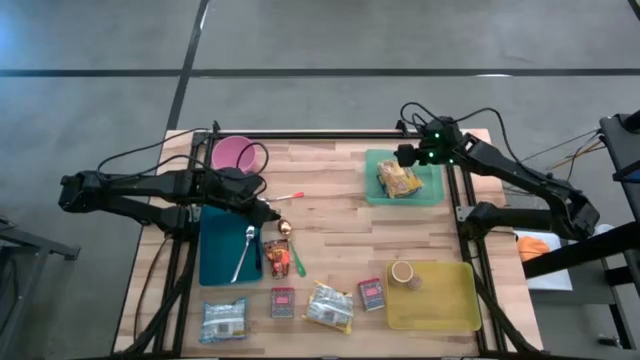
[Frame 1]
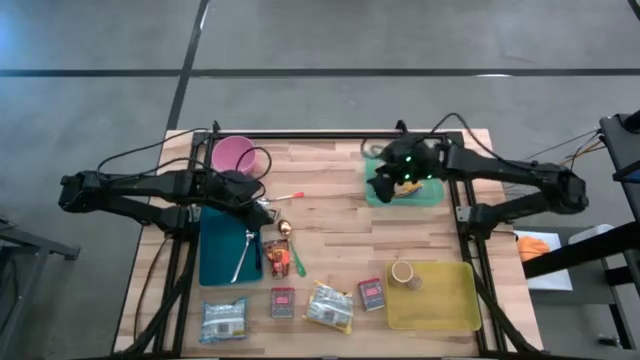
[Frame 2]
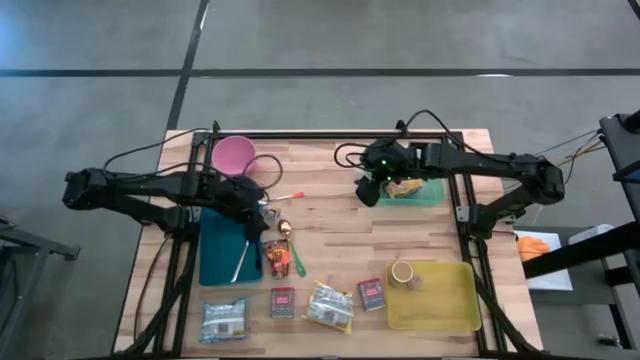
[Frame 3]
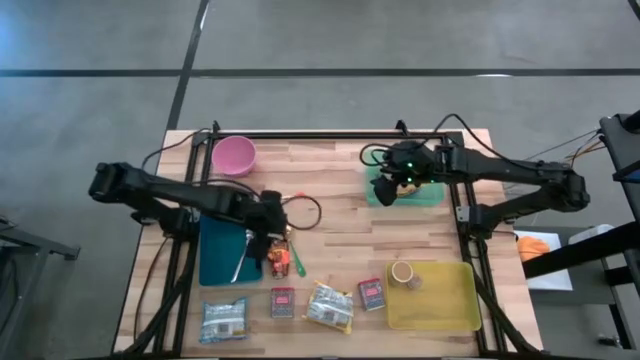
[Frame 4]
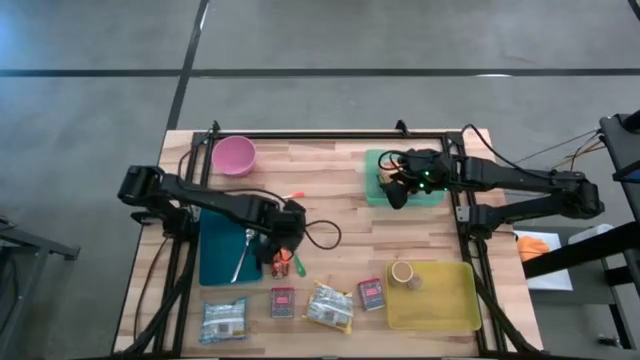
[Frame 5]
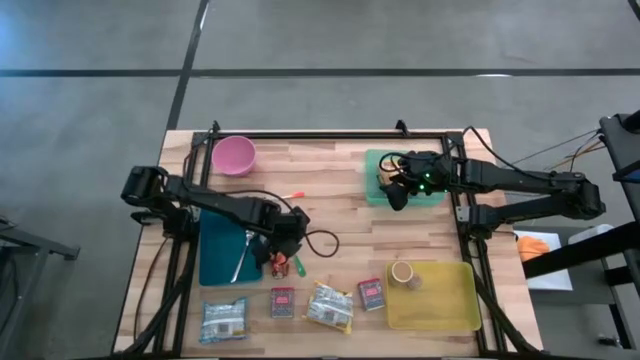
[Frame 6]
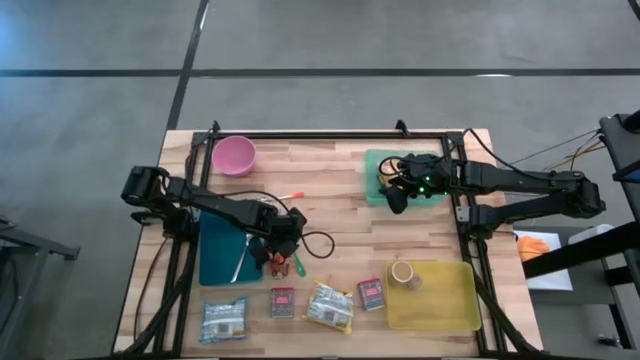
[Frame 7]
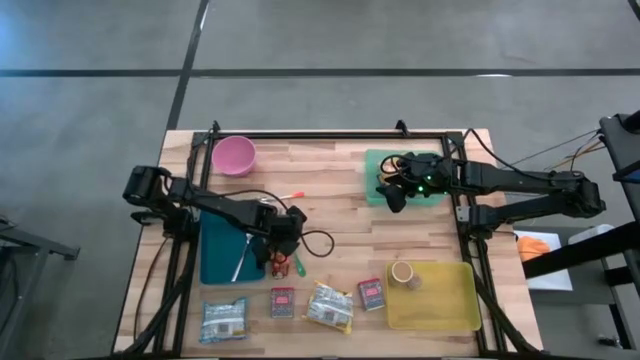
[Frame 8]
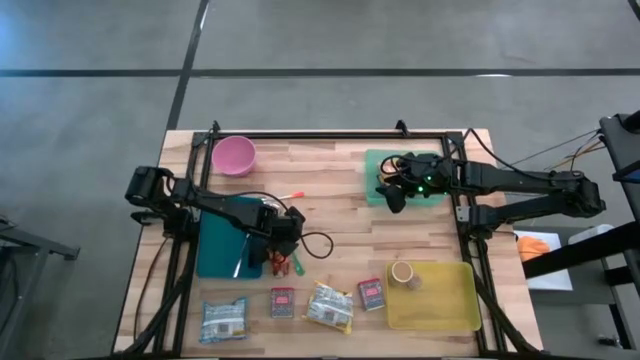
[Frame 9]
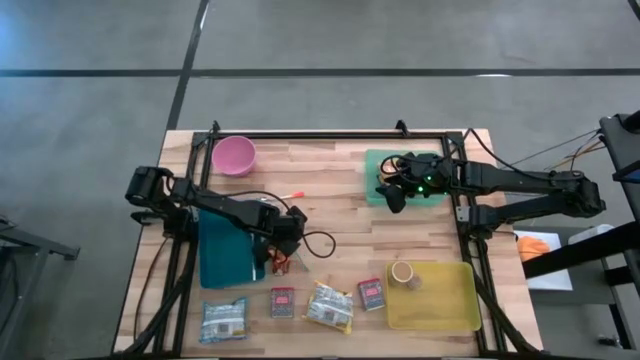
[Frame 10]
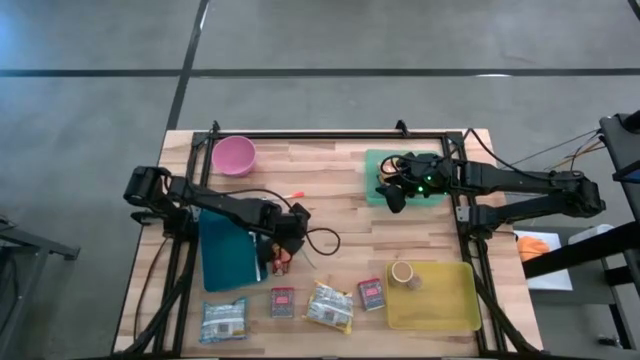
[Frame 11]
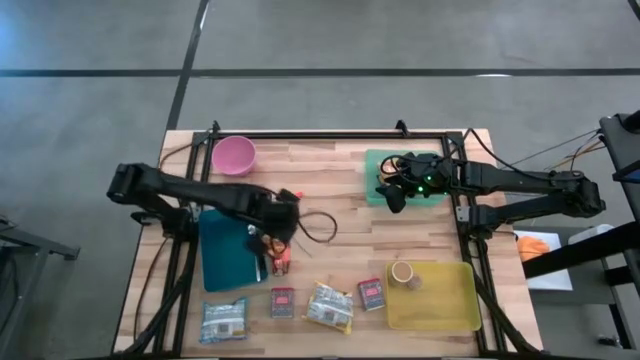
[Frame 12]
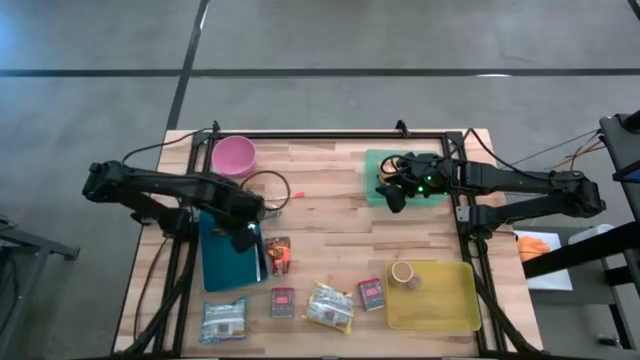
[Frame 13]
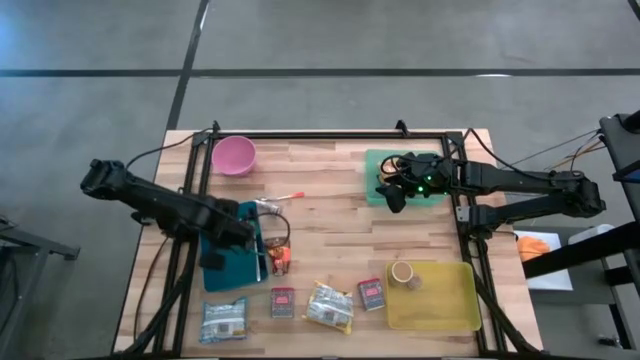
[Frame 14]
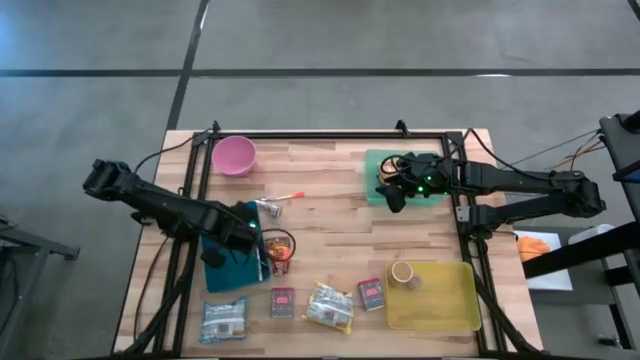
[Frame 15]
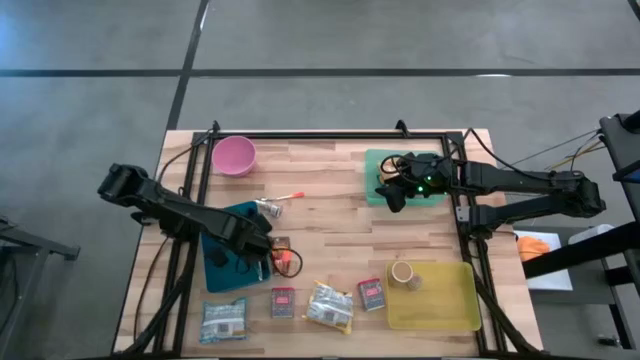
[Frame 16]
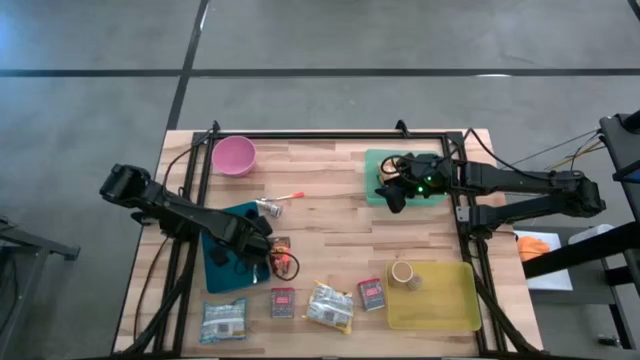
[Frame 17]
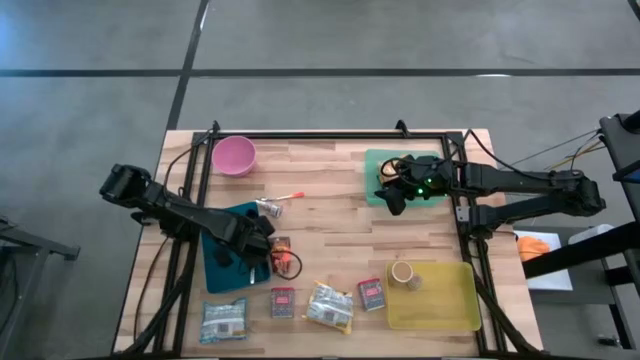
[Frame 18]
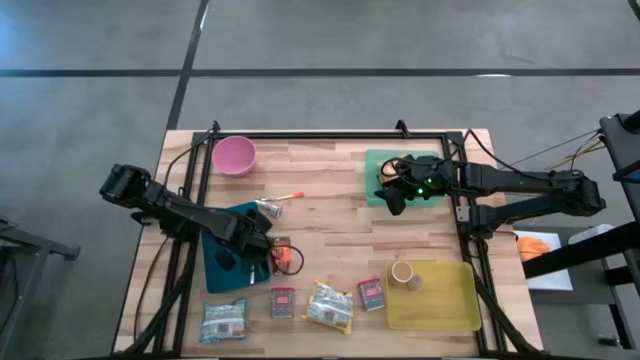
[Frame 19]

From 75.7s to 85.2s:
Put the green spoon into the blue bin

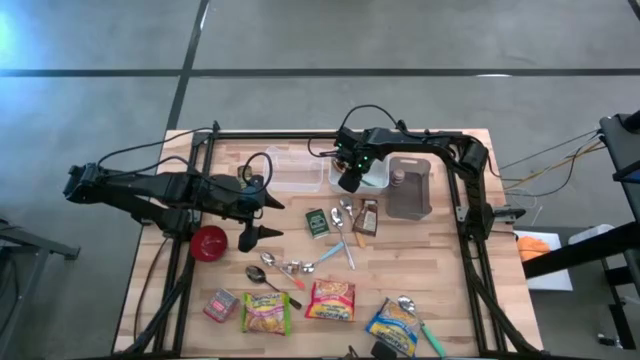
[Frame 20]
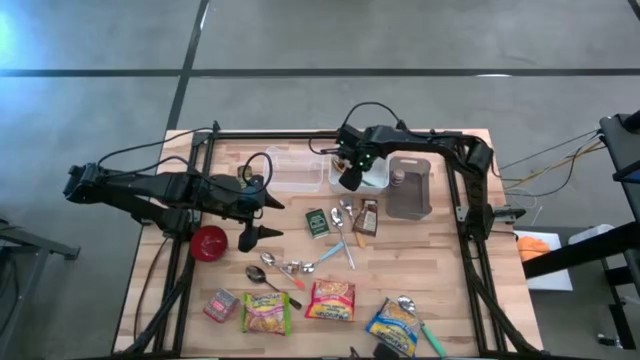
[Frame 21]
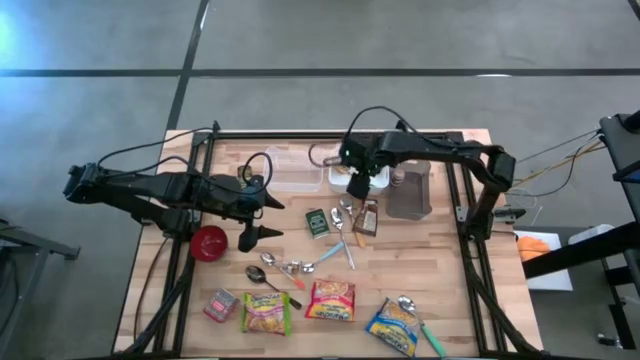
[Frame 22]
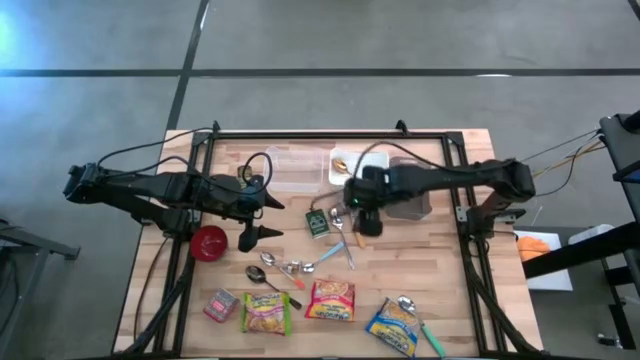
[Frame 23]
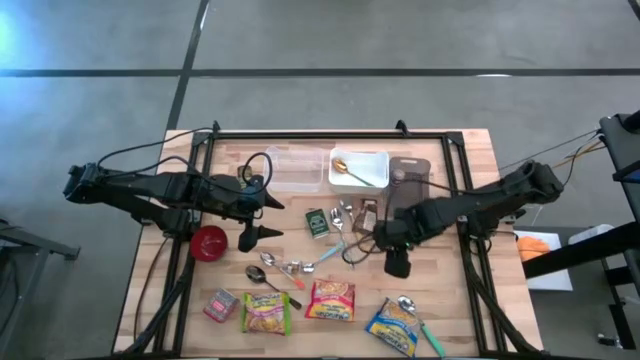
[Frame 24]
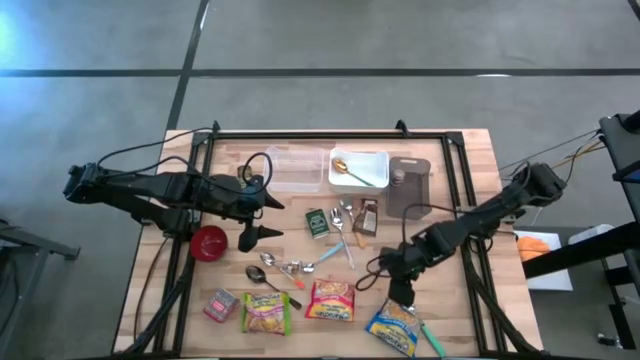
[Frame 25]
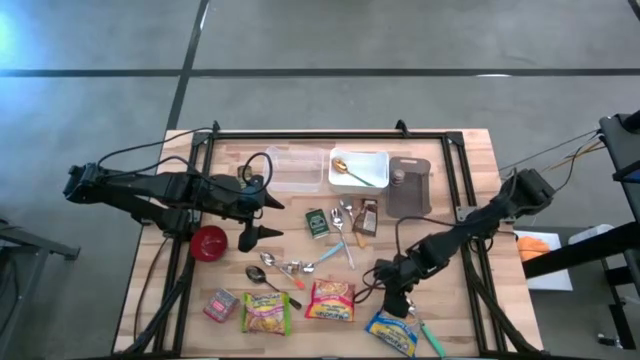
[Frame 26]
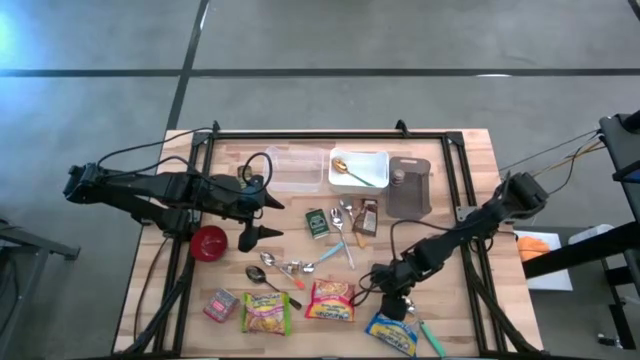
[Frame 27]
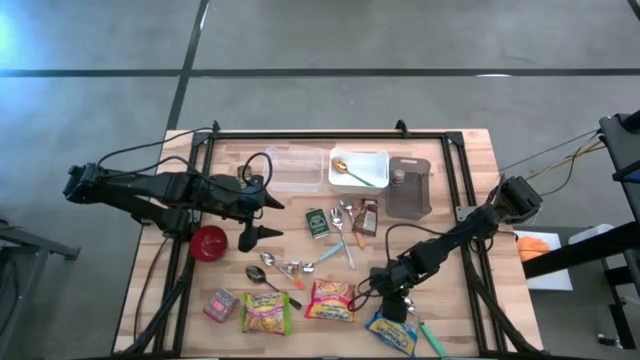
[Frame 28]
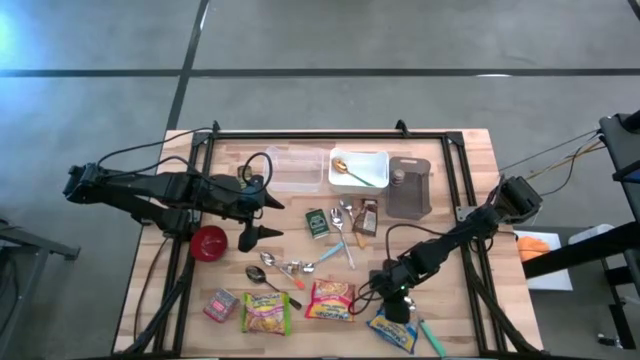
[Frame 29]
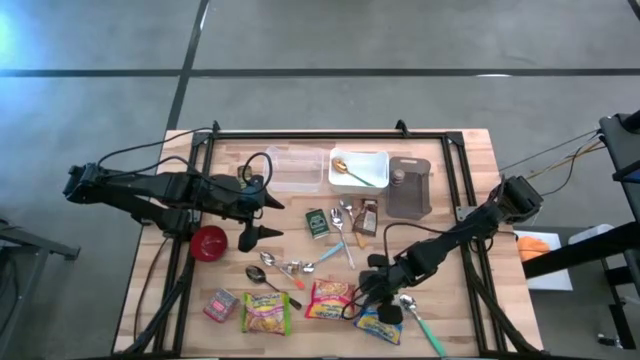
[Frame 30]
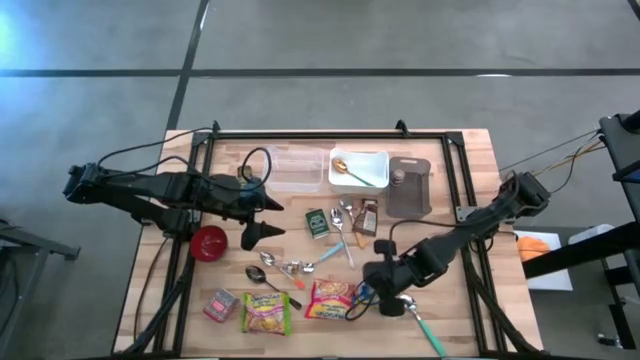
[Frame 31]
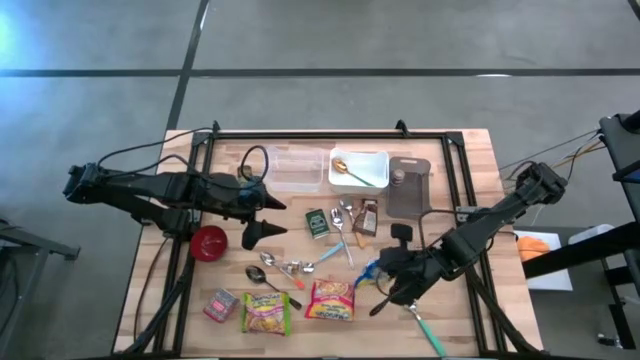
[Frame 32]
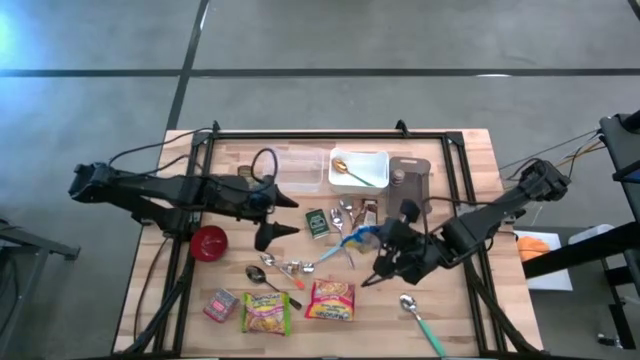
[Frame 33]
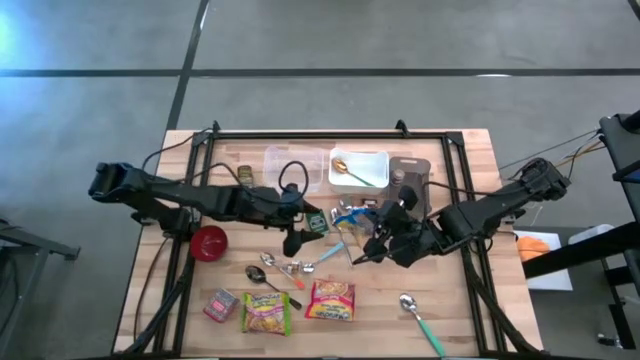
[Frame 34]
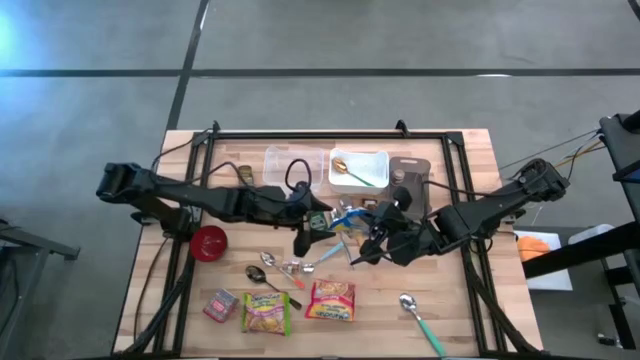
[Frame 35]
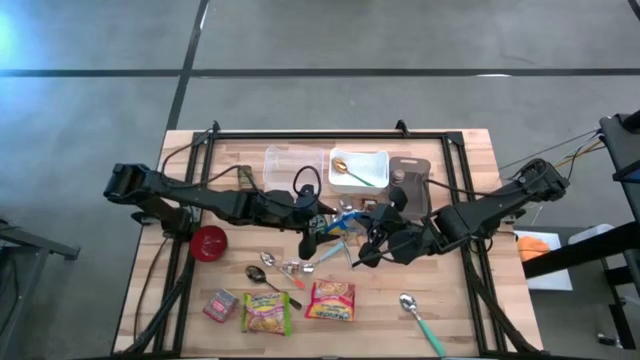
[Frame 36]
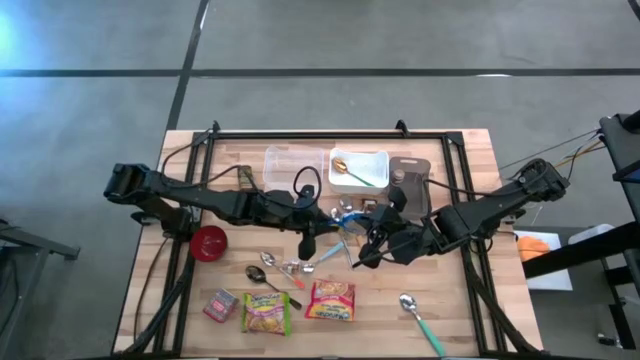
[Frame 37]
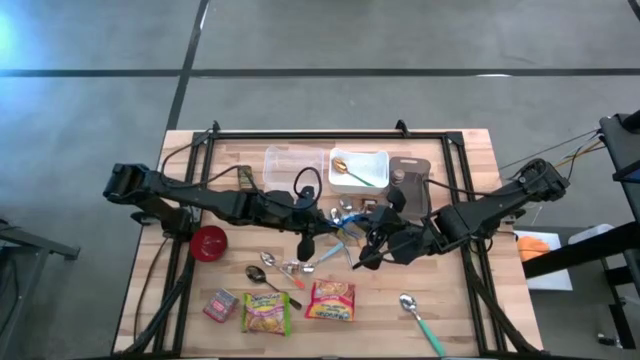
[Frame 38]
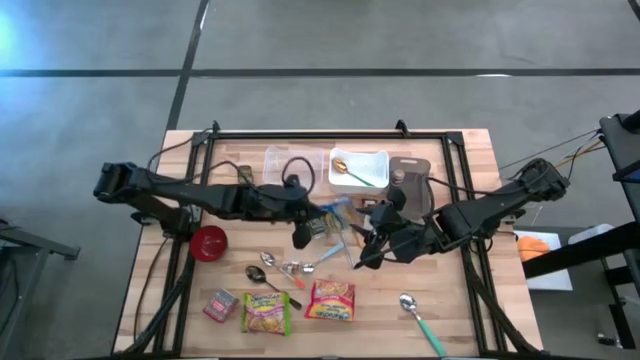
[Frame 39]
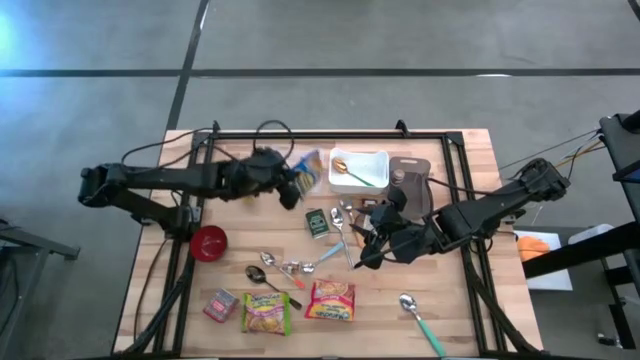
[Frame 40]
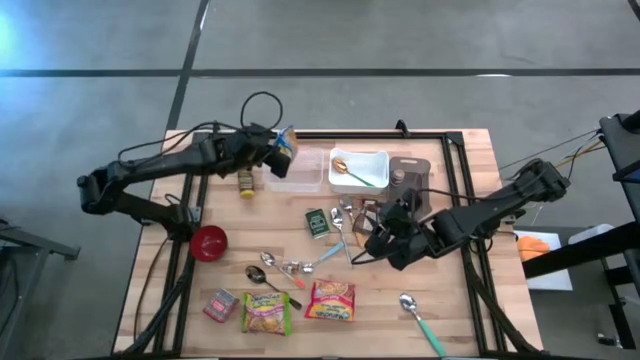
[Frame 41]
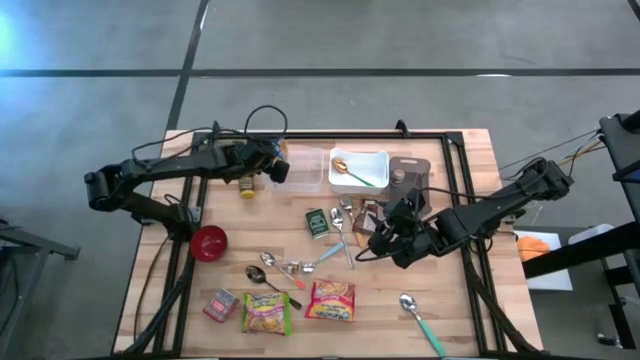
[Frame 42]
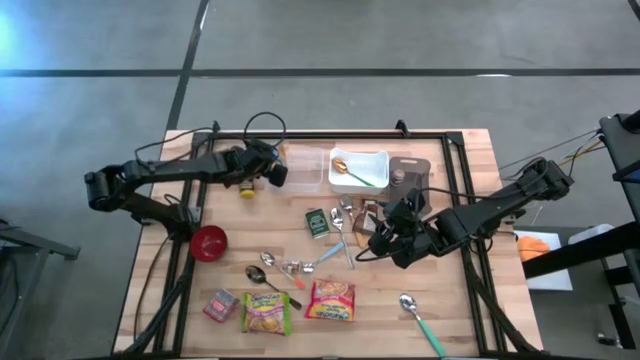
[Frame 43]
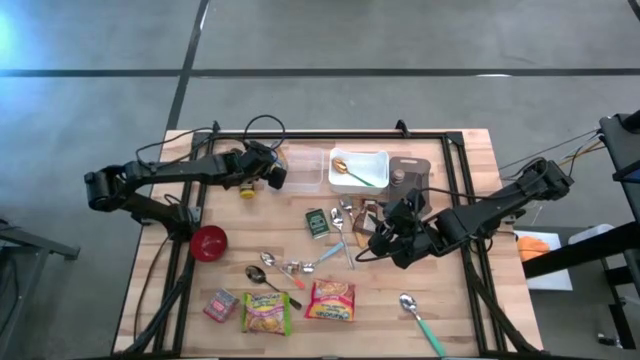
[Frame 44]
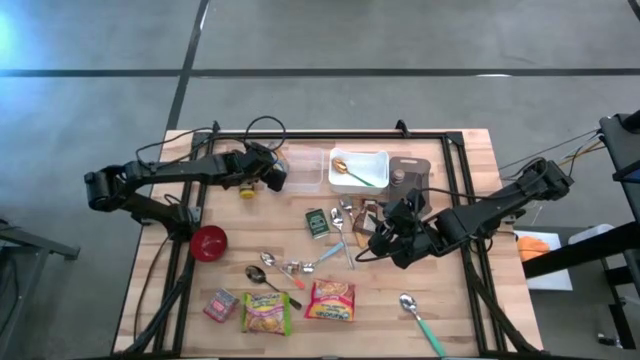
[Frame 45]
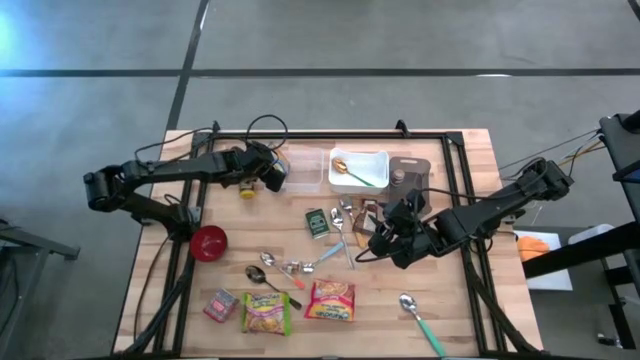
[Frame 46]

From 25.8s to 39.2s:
Put the blue noodle pack into the transparent bin
